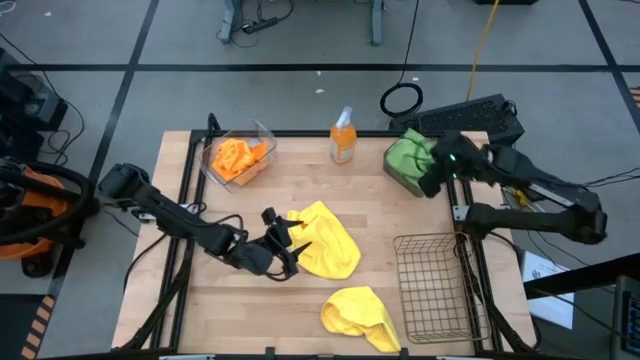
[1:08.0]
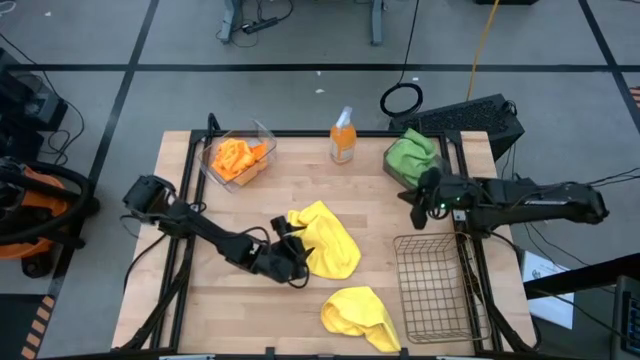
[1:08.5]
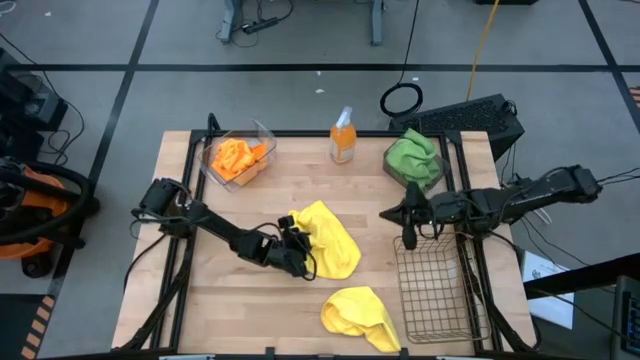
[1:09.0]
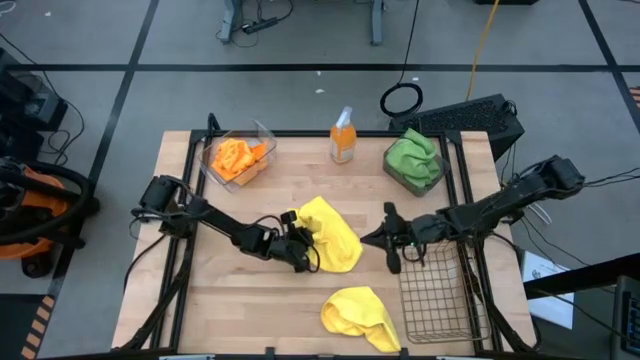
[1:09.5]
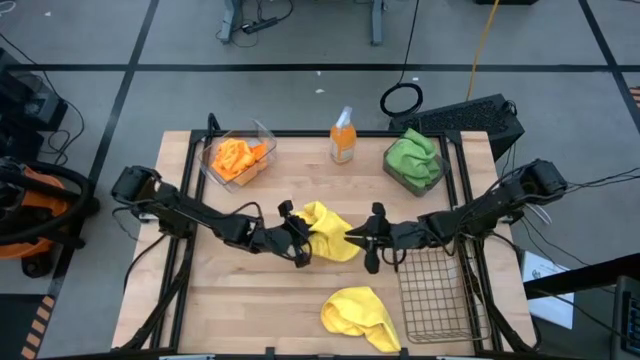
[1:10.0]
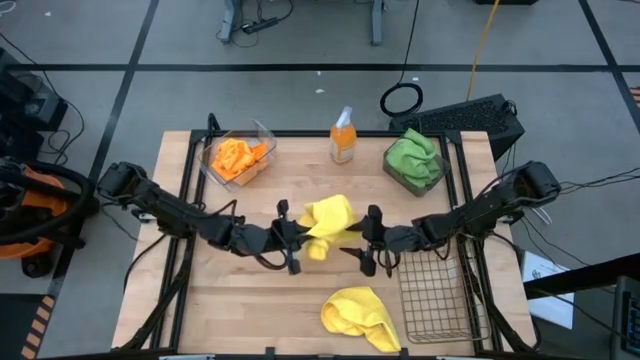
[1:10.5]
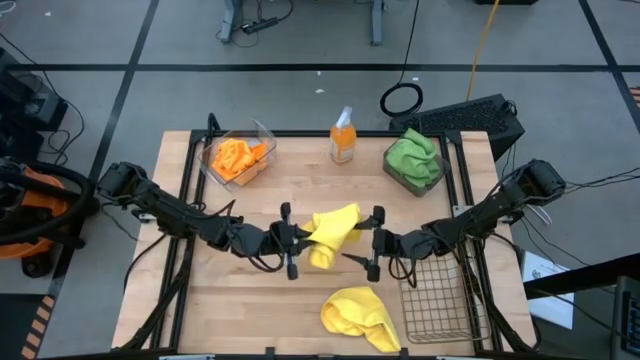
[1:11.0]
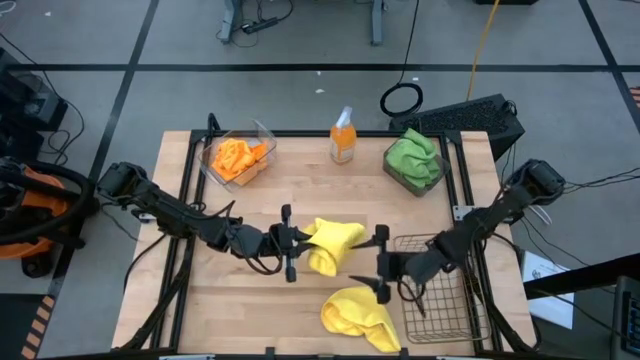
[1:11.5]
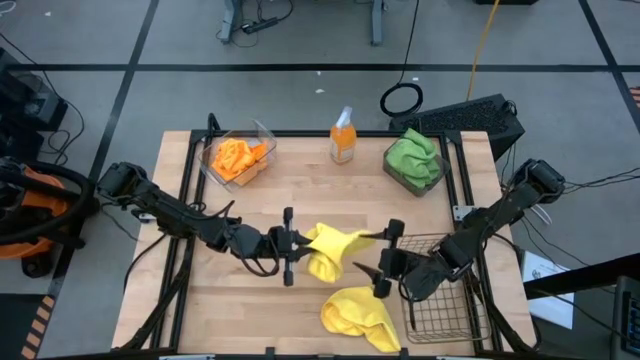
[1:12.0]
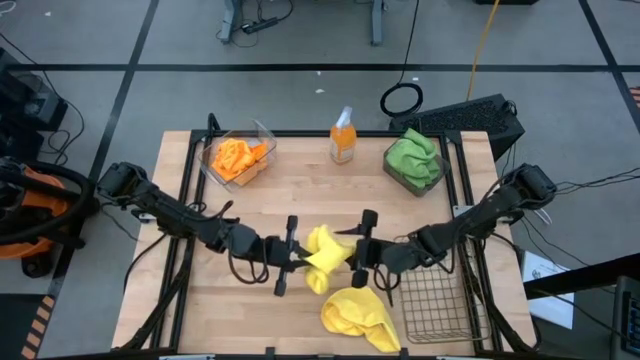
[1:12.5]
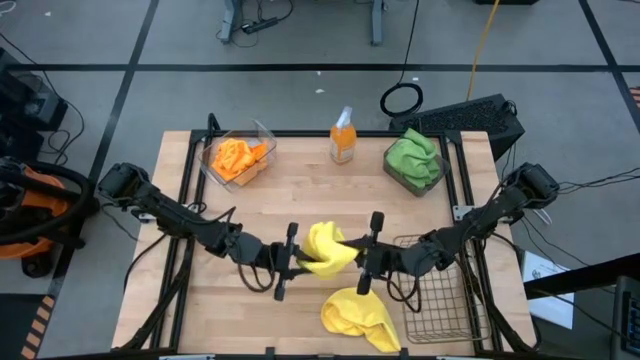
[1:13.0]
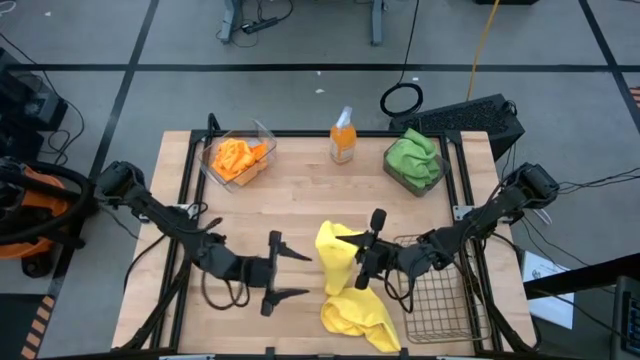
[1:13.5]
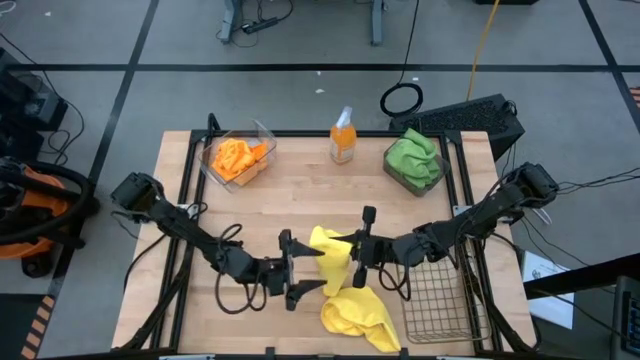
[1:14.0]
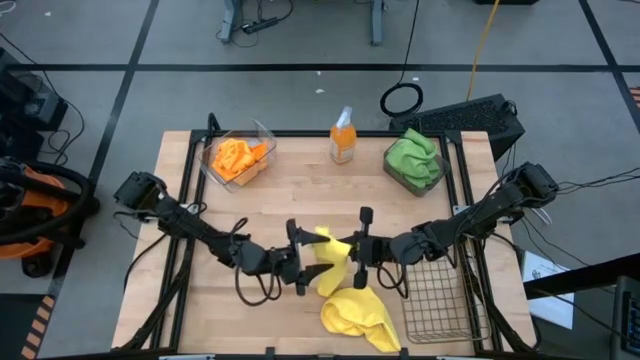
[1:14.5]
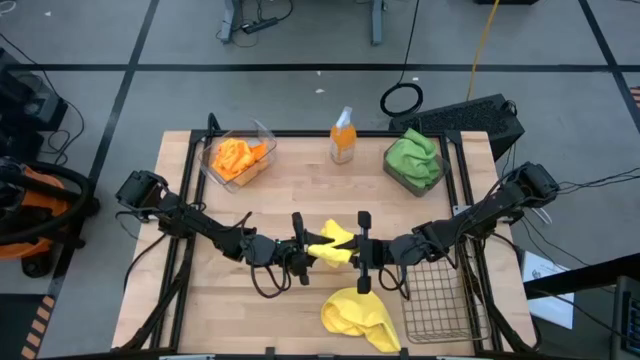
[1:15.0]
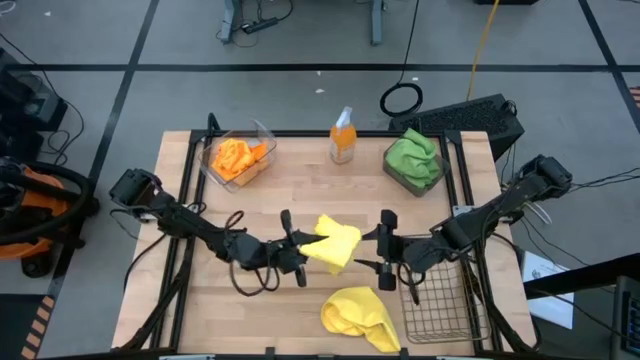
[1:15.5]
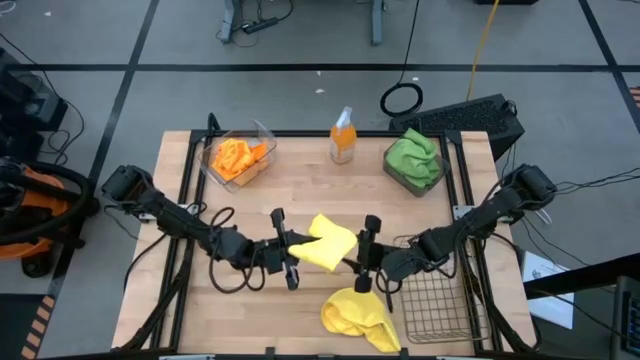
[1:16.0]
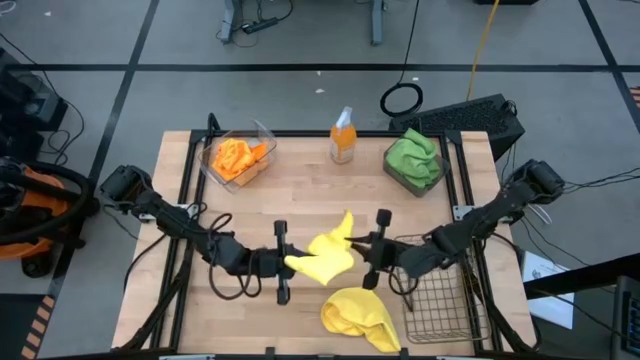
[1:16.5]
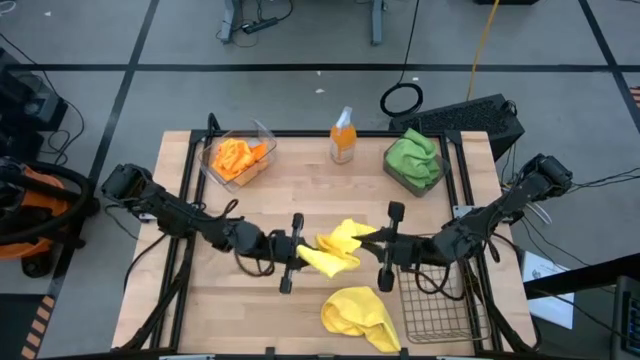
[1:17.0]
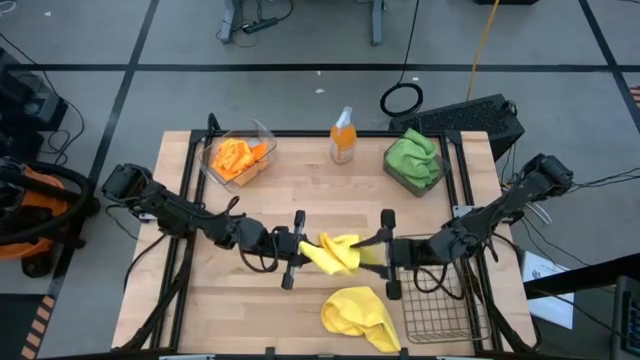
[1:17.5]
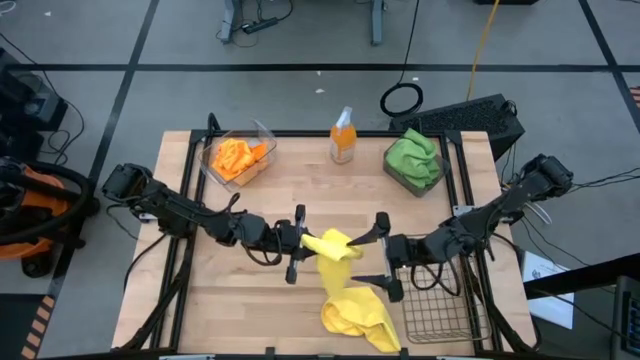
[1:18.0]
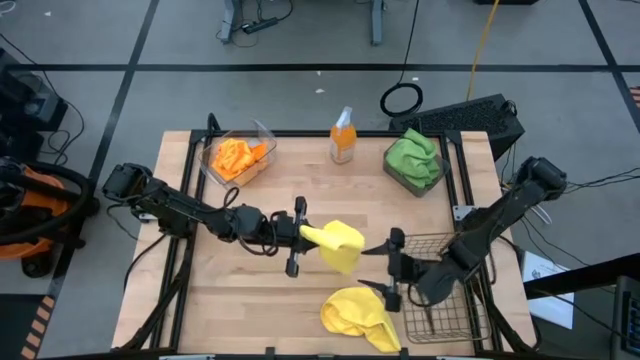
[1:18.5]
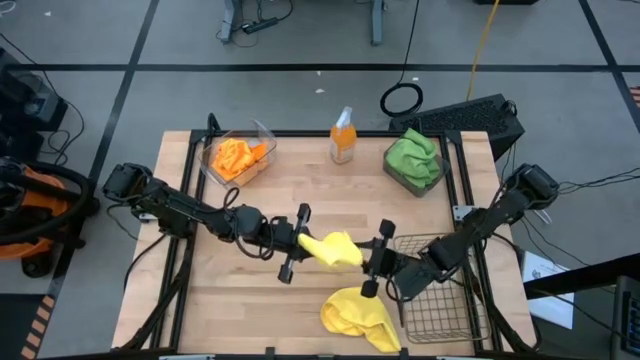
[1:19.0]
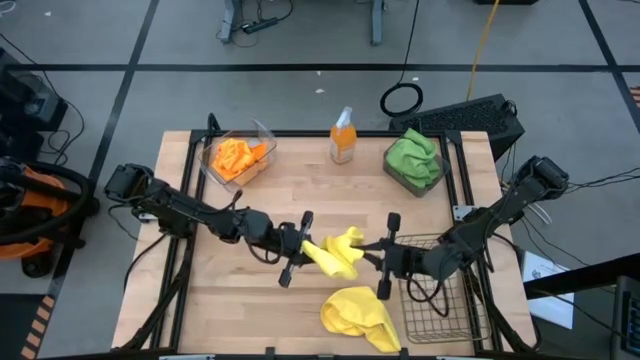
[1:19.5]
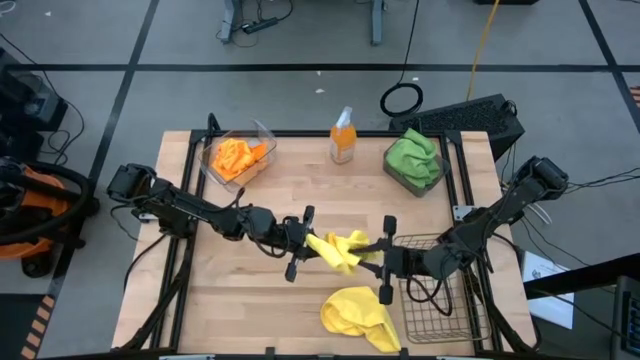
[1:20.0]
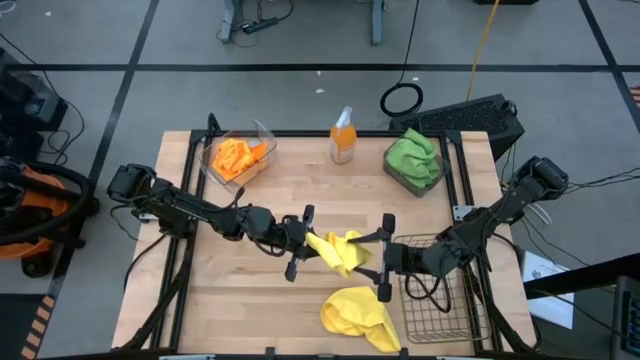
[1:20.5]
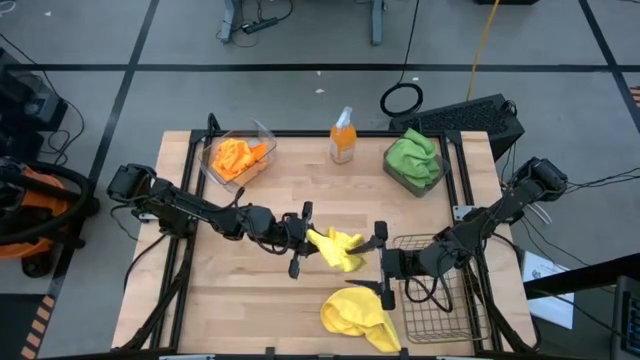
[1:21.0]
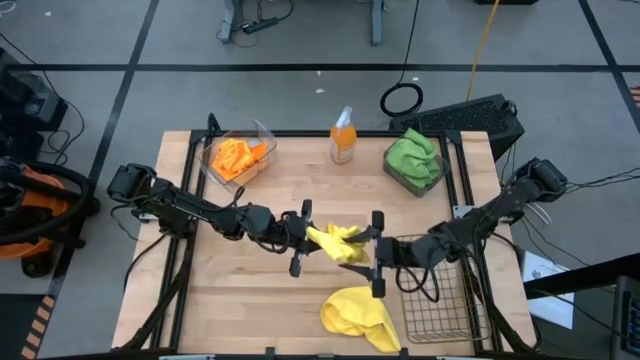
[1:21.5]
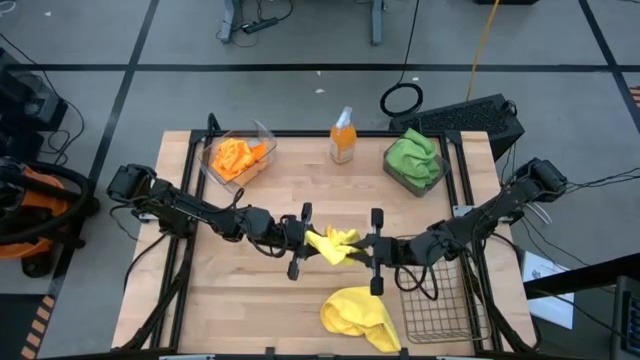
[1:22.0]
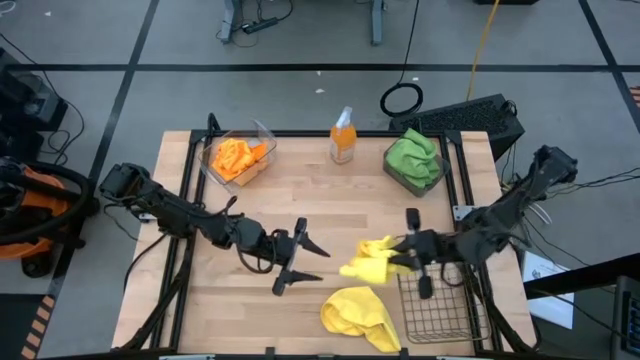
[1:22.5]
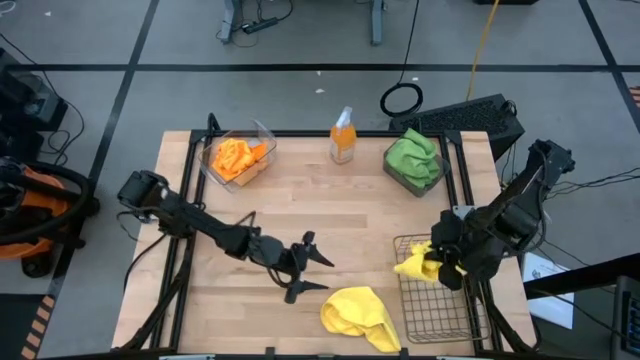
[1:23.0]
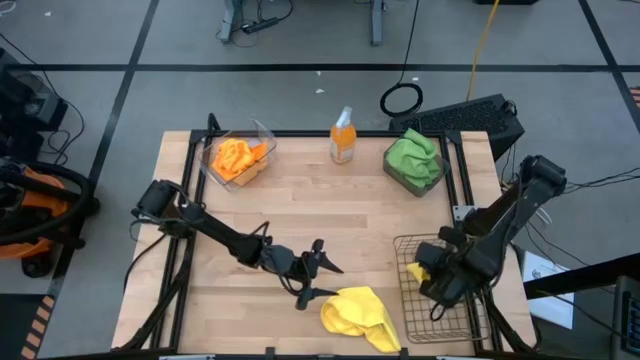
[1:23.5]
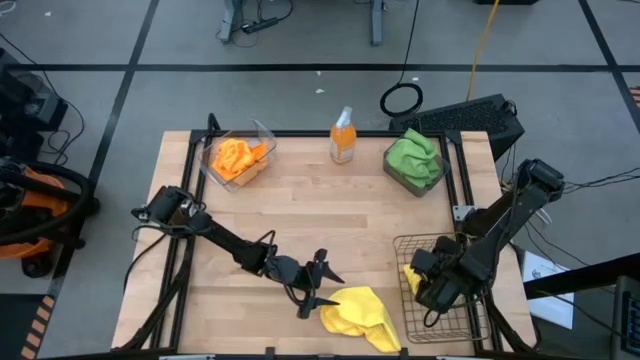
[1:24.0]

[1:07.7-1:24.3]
Task: Sort microfiber towel by color & place in baskets
Put the top yellow microfiber cloth into the wire basket
